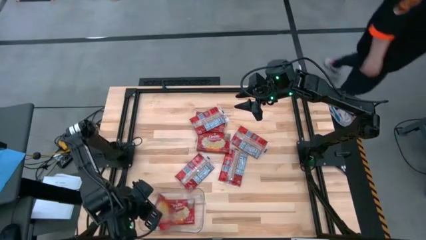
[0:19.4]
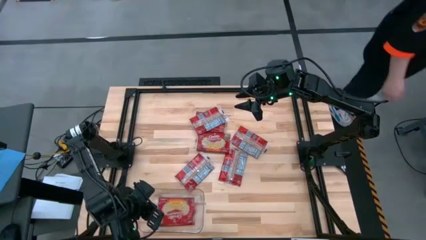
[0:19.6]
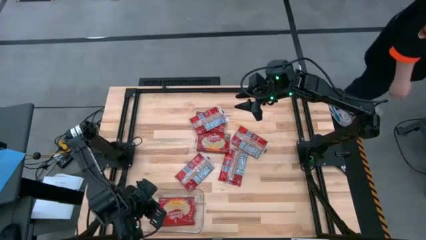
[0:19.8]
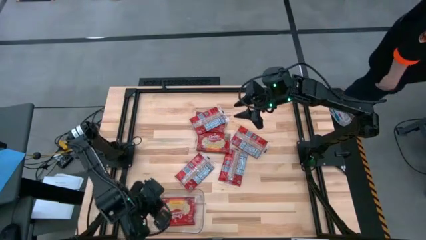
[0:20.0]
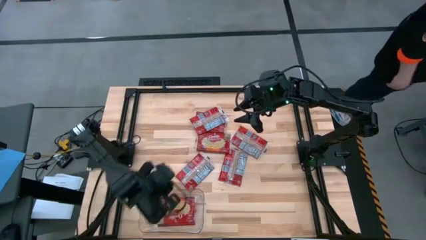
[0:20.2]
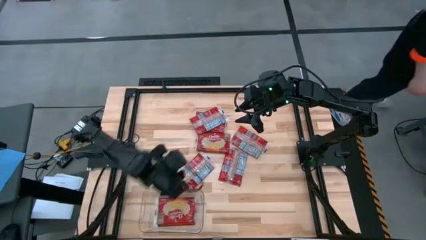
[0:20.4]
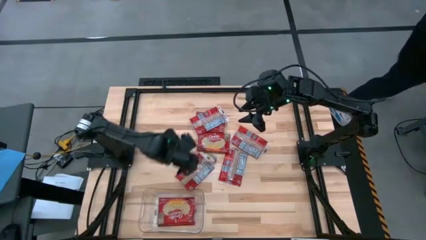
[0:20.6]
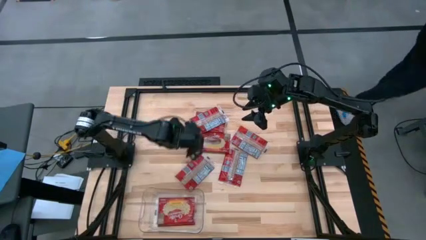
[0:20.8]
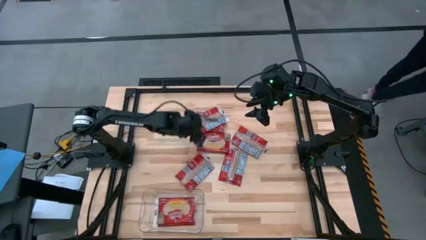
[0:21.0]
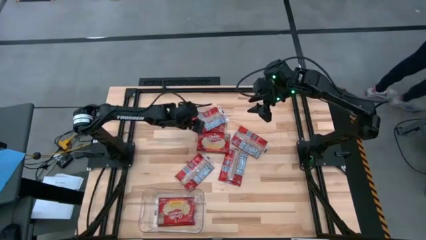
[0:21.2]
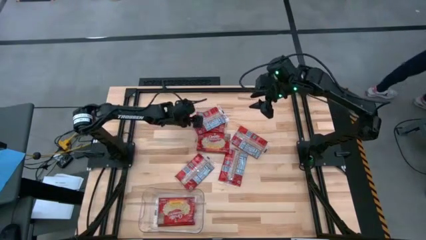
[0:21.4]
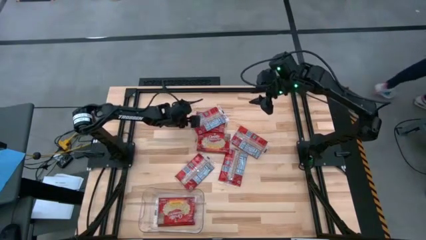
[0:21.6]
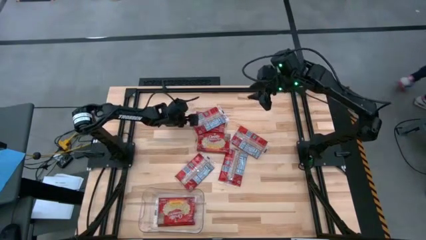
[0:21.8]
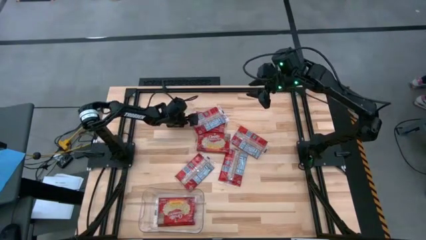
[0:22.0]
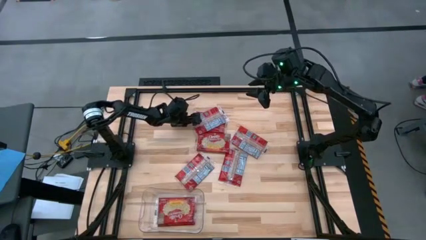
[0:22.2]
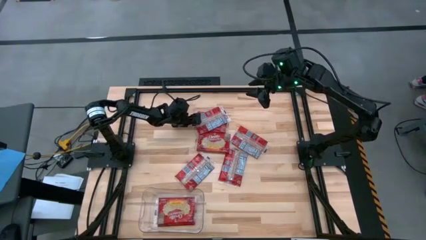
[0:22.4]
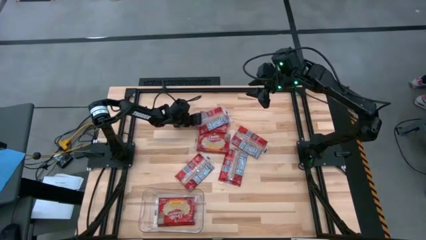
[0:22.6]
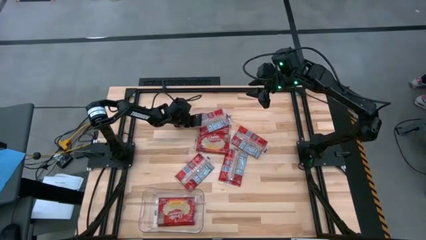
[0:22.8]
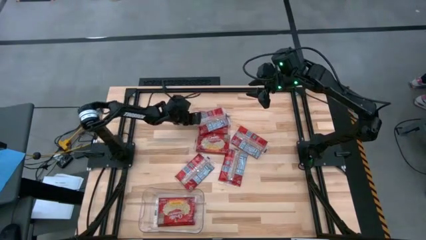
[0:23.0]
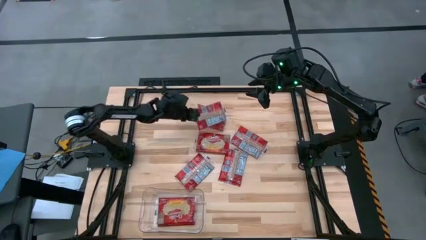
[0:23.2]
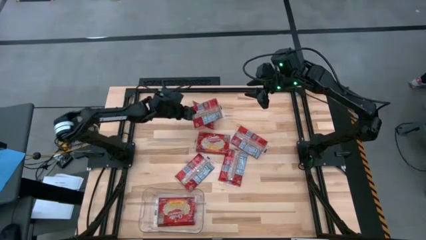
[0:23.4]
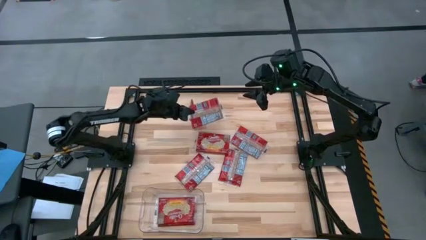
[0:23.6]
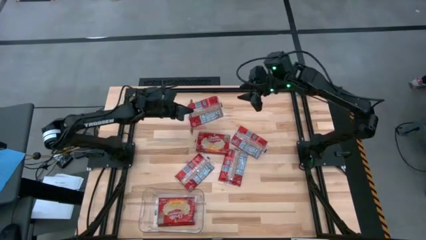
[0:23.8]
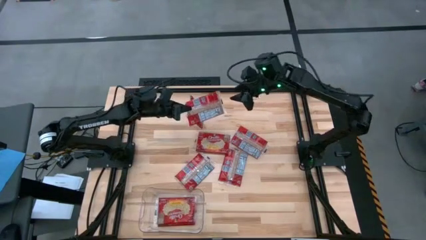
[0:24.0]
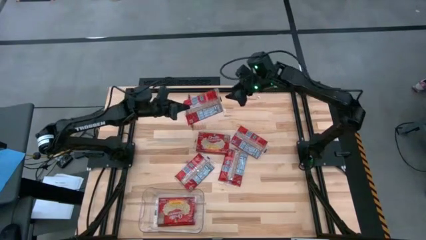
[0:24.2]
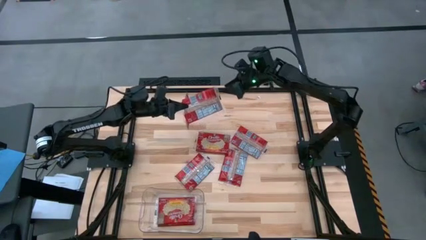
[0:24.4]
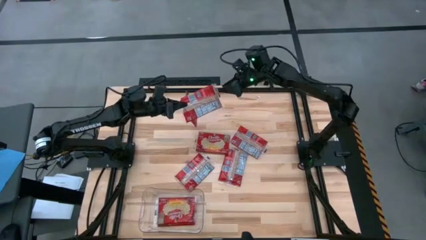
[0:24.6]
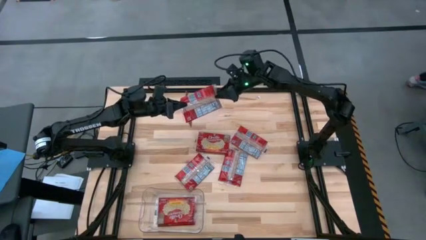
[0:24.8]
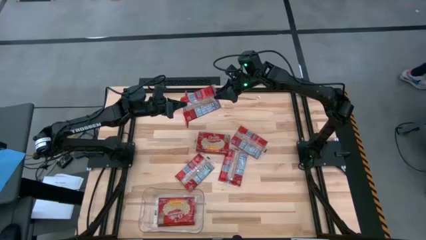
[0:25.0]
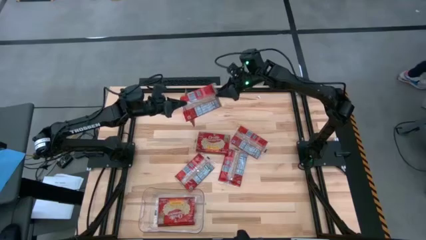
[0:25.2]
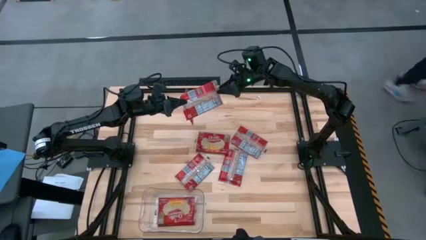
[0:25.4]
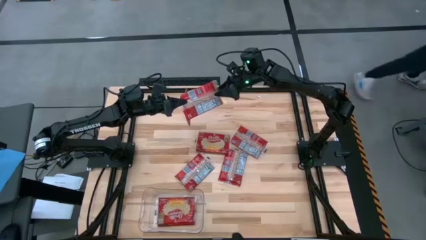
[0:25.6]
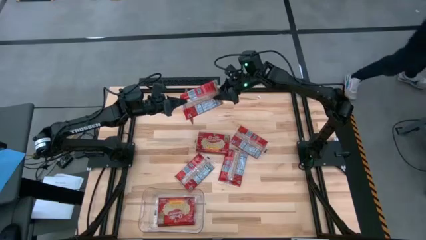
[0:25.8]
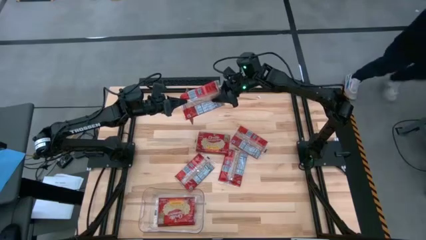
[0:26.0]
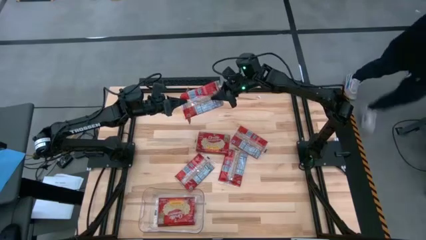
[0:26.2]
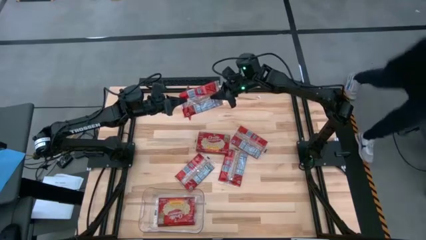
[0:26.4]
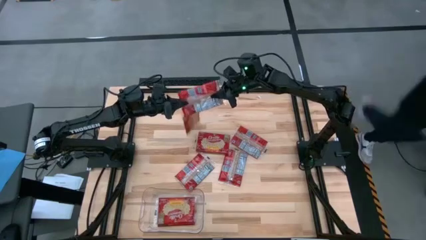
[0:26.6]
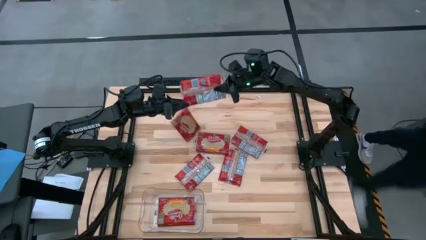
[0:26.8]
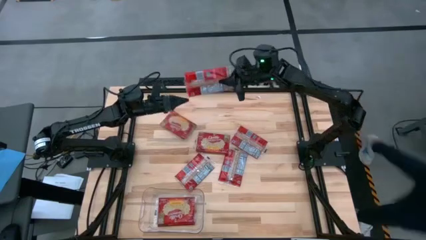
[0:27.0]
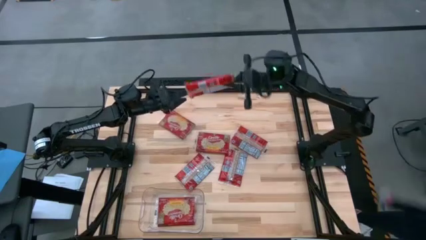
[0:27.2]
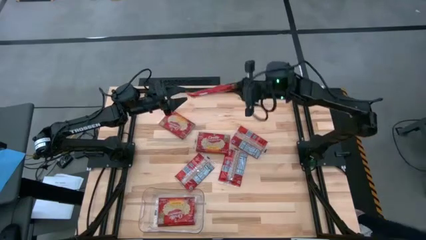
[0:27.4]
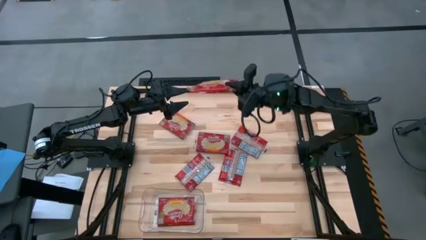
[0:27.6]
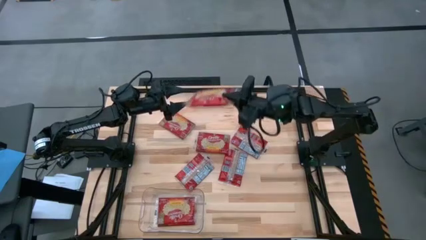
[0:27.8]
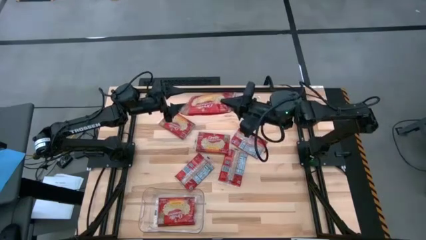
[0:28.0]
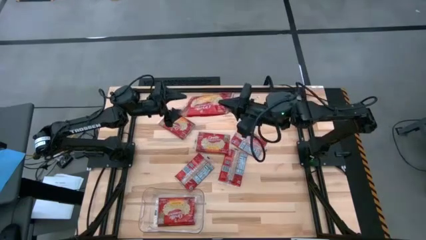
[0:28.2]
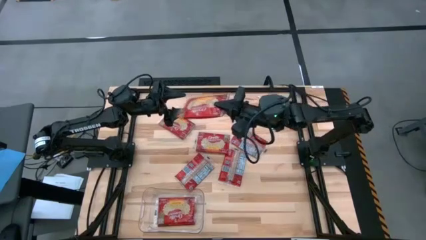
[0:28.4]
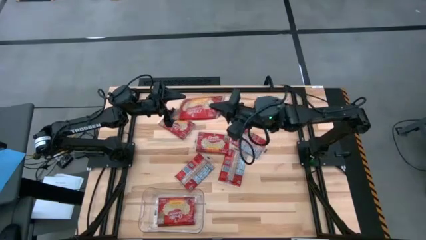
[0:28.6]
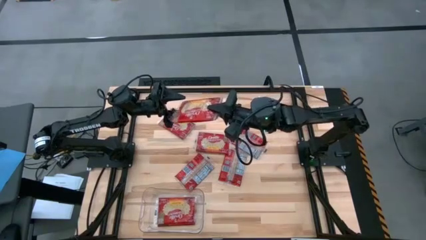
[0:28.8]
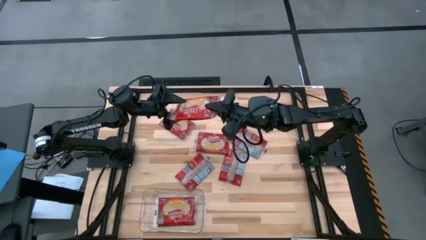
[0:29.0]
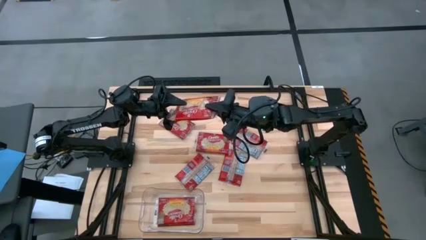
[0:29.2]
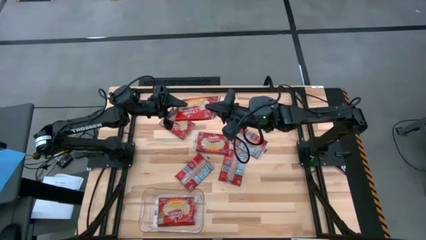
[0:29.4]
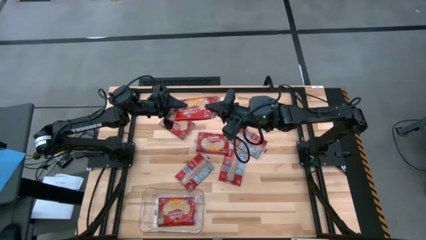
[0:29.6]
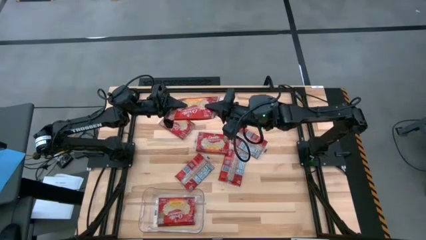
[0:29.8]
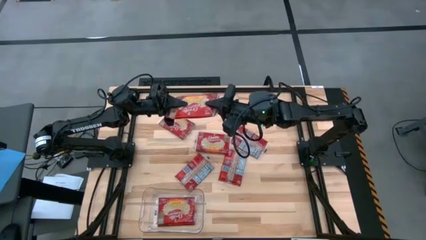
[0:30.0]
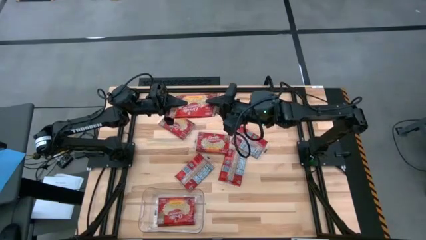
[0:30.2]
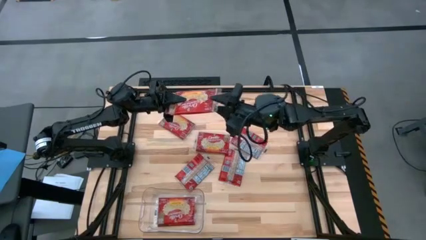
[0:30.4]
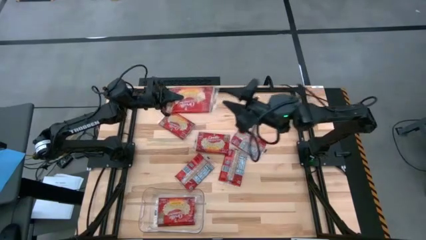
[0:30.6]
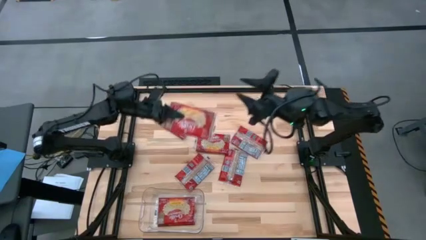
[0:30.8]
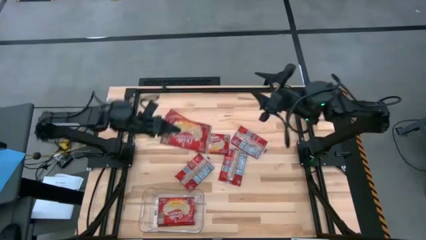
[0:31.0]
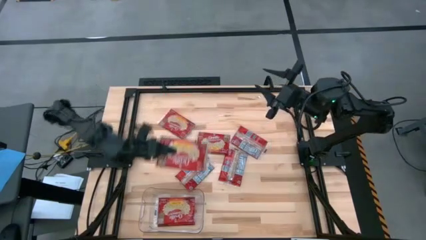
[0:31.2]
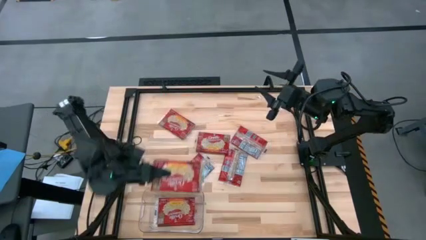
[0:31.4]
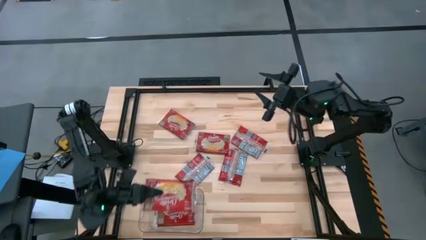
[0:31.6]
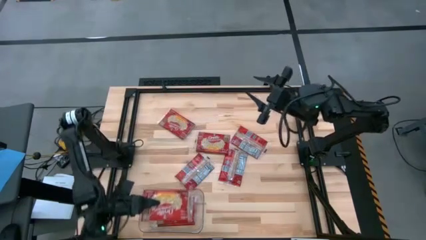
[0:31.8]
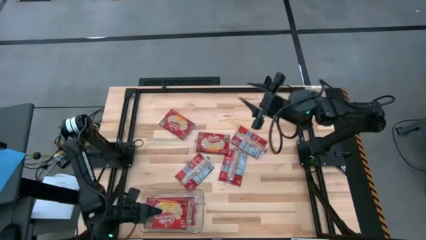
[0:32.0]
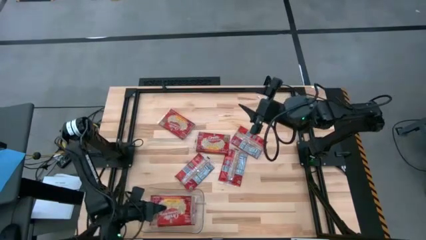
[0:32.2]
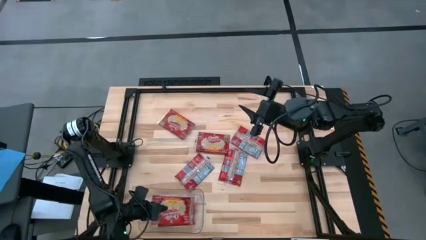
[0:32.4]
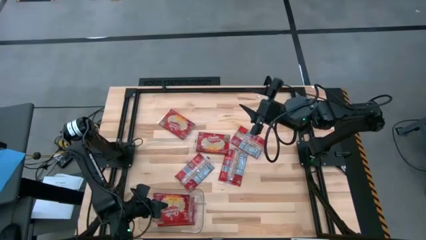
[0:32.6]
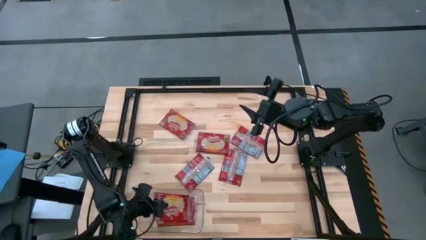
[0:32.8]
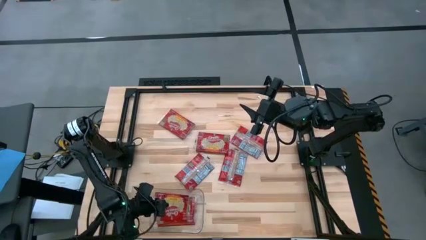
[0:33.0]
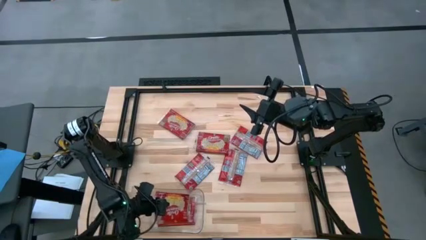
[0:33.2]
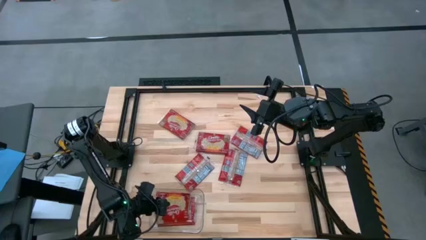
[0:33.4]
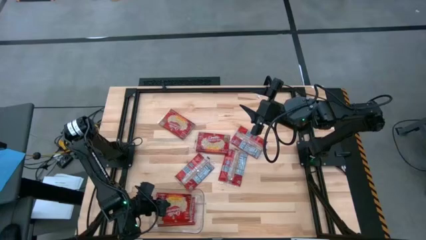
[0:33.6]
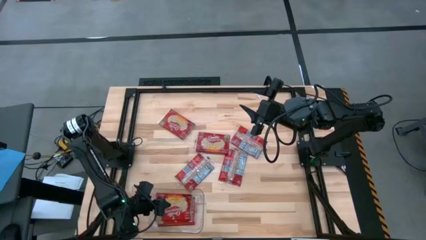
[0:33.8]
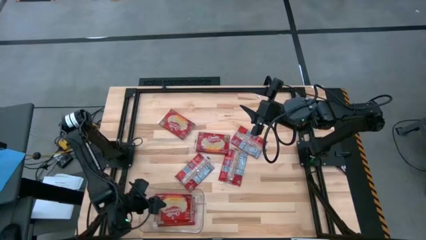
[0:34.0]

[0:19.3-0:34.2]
Task: Sort popcorn bags into baskets
Put the red popcorn bag into the transparent bin
